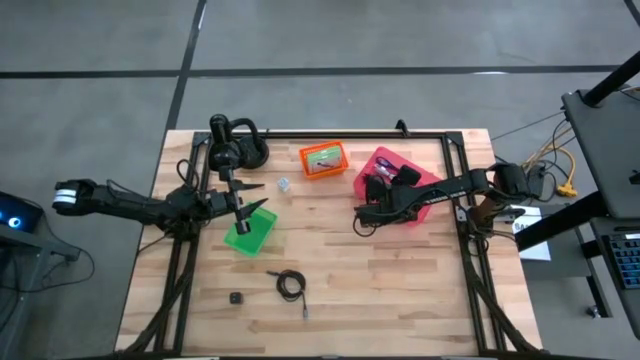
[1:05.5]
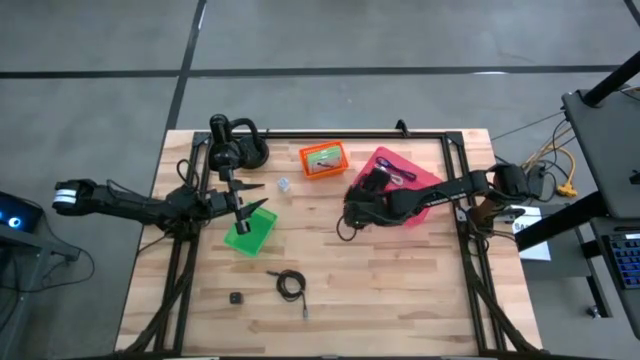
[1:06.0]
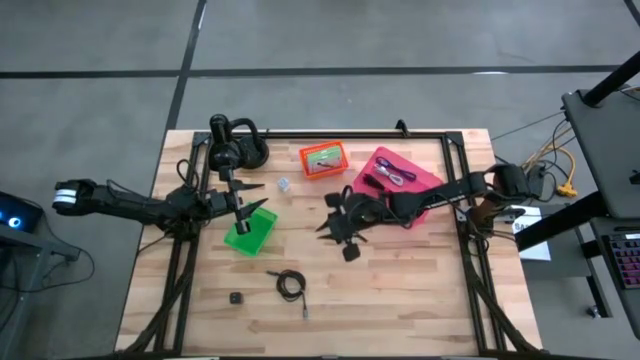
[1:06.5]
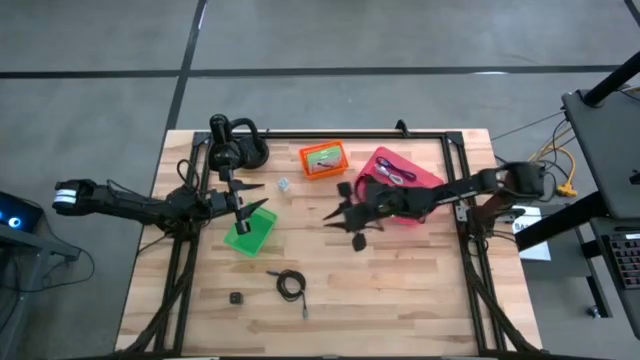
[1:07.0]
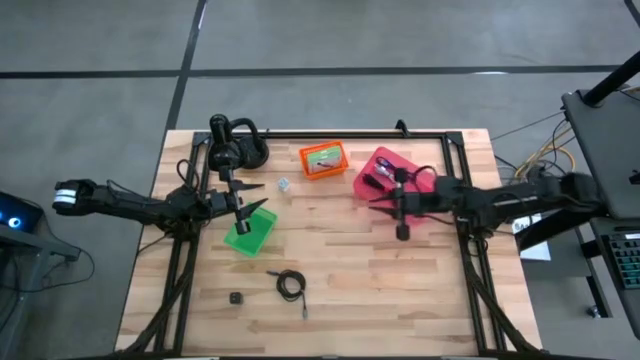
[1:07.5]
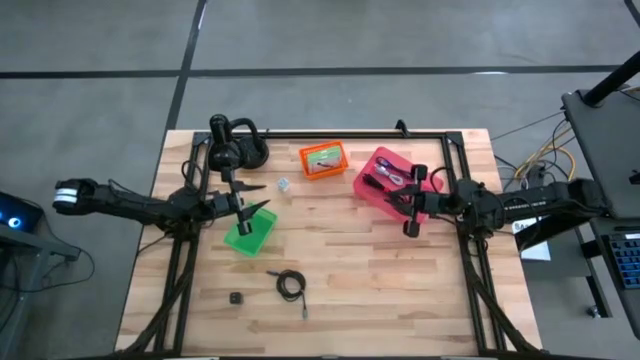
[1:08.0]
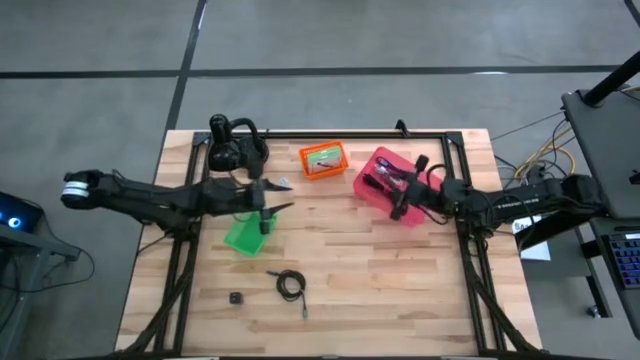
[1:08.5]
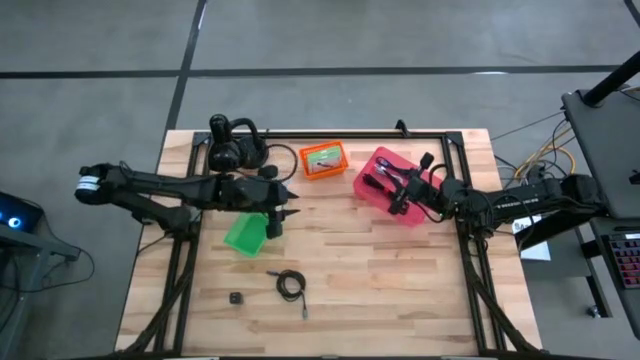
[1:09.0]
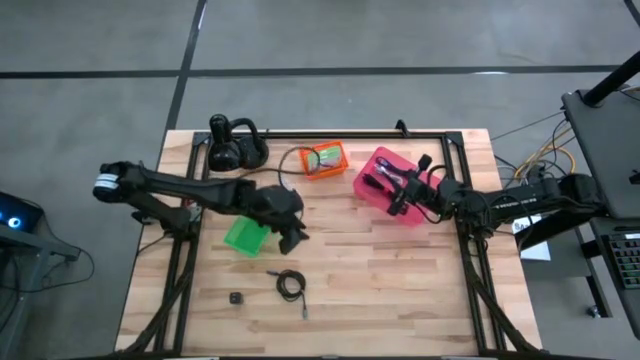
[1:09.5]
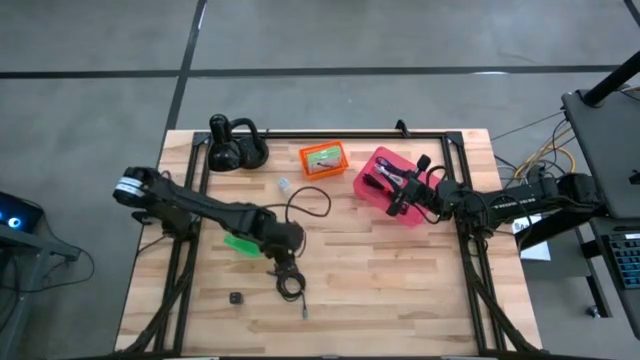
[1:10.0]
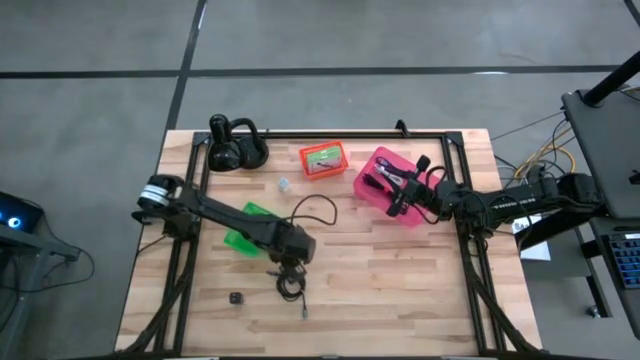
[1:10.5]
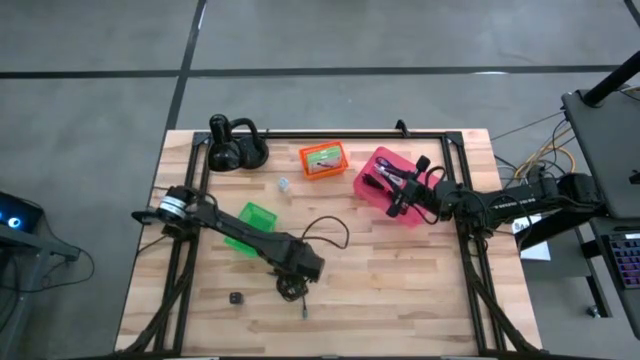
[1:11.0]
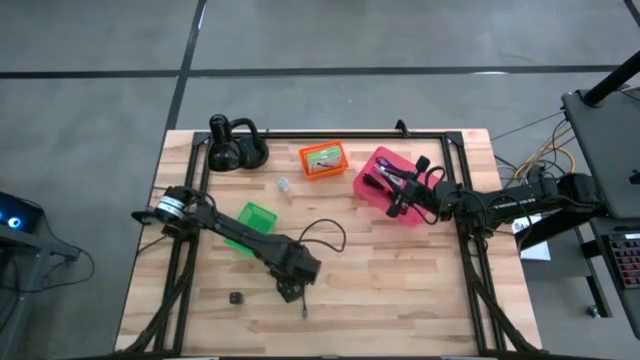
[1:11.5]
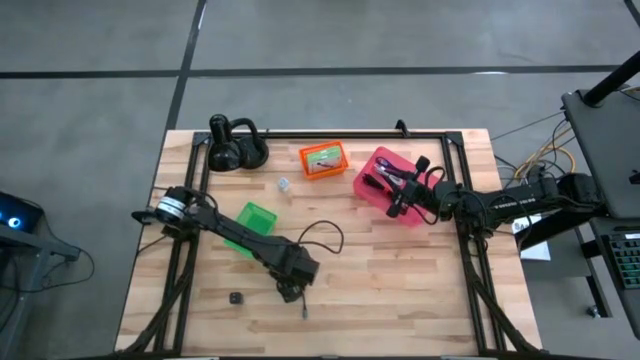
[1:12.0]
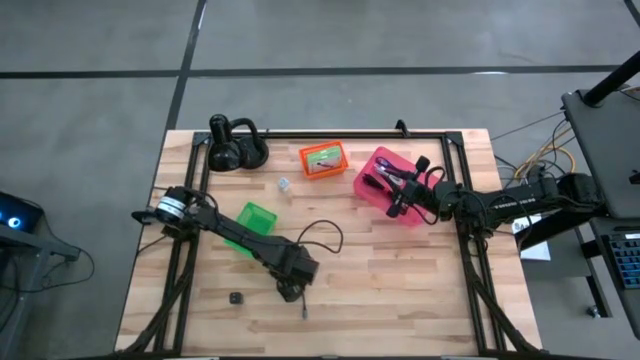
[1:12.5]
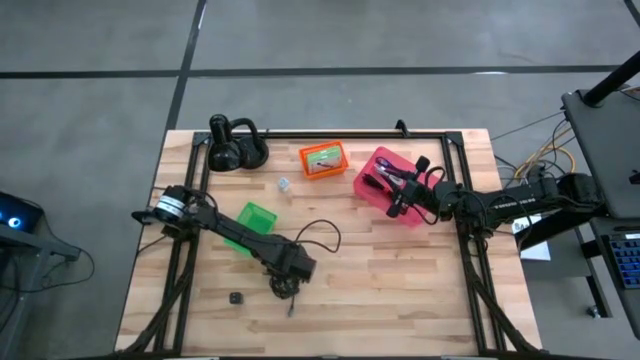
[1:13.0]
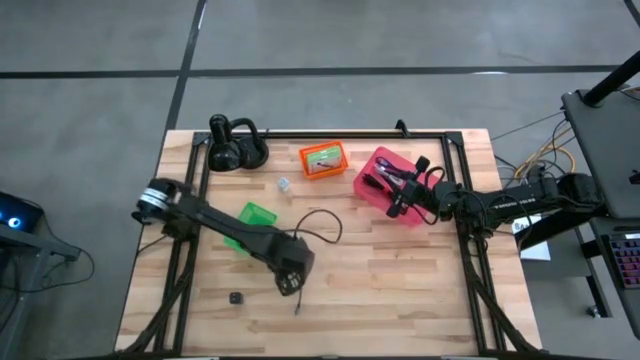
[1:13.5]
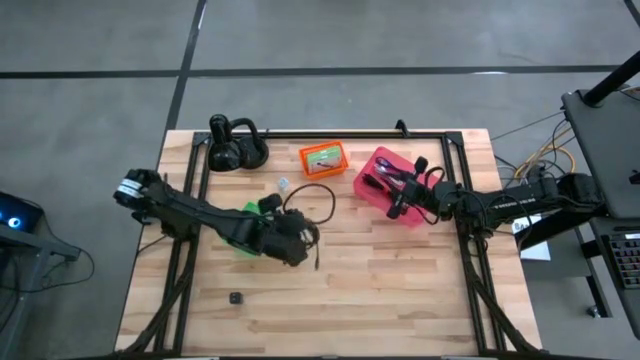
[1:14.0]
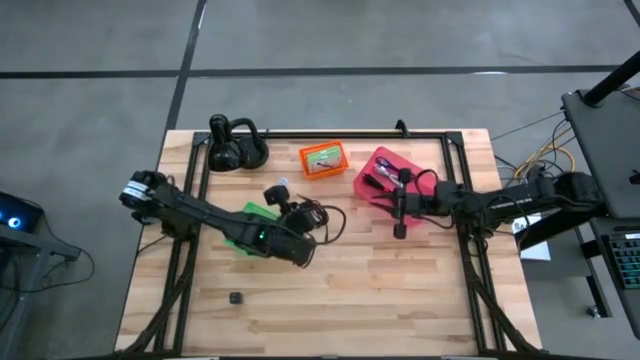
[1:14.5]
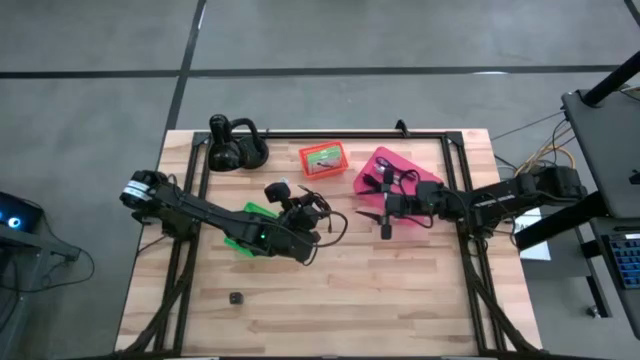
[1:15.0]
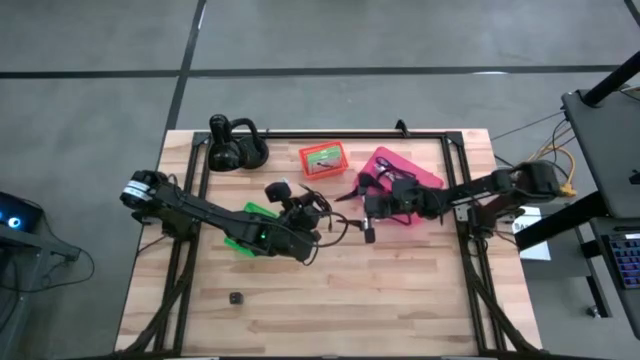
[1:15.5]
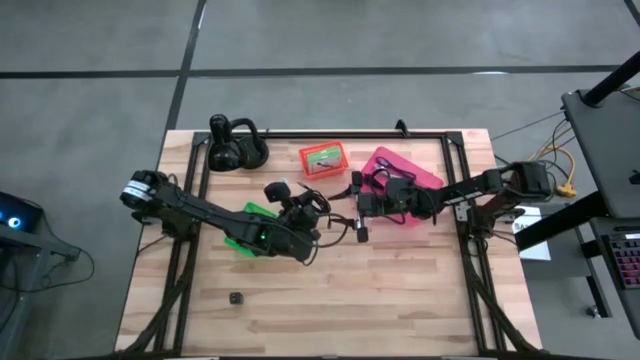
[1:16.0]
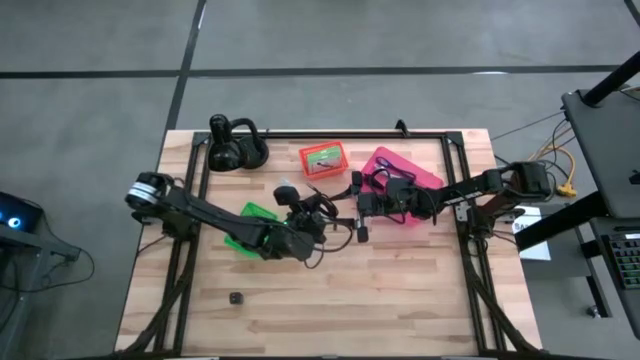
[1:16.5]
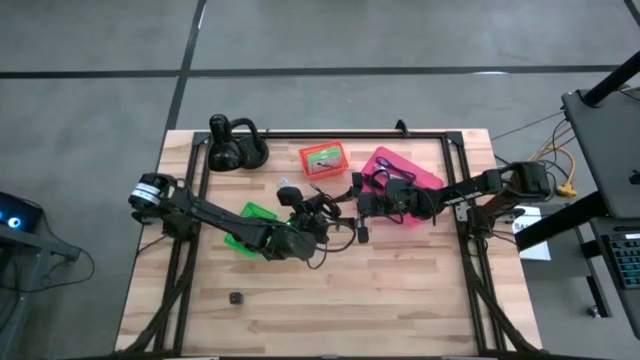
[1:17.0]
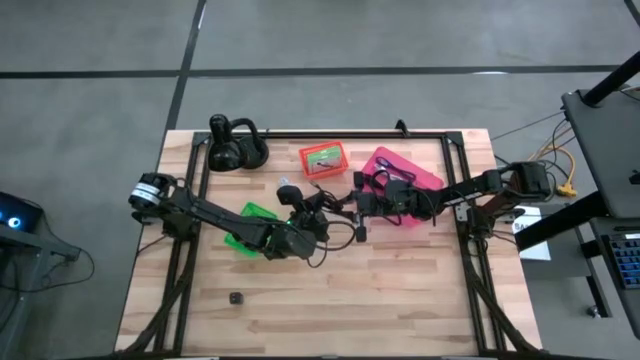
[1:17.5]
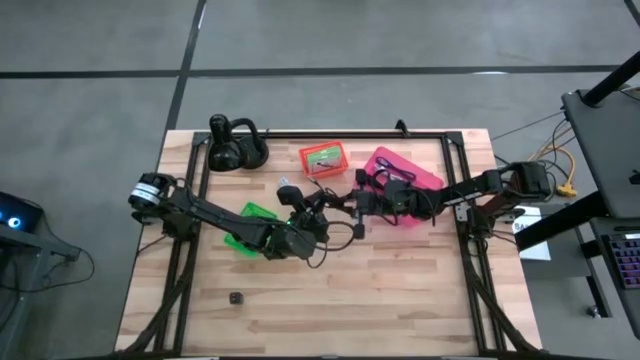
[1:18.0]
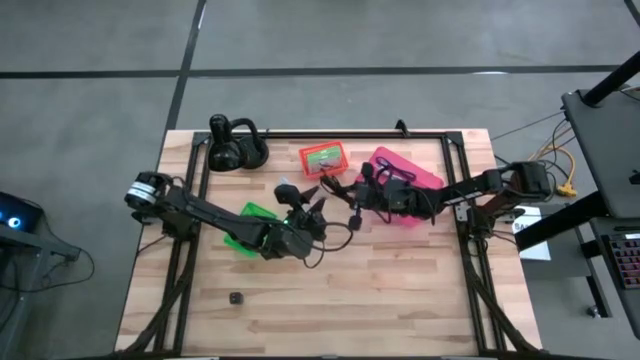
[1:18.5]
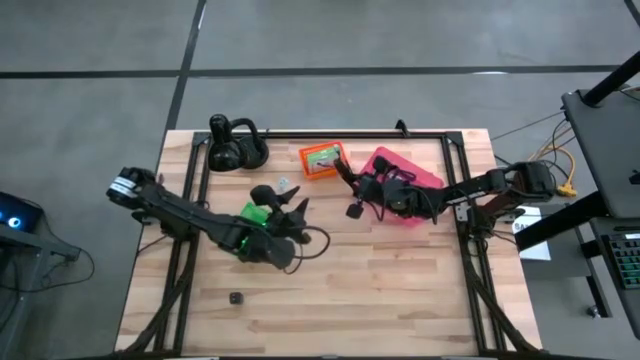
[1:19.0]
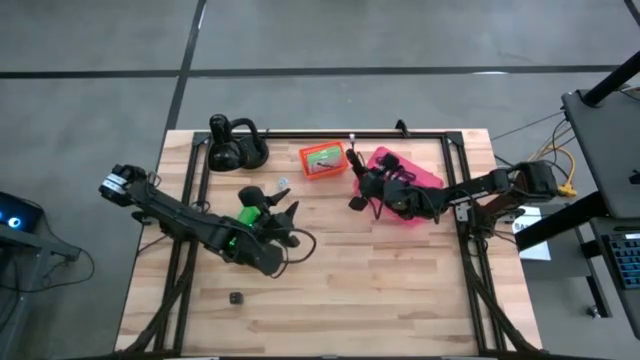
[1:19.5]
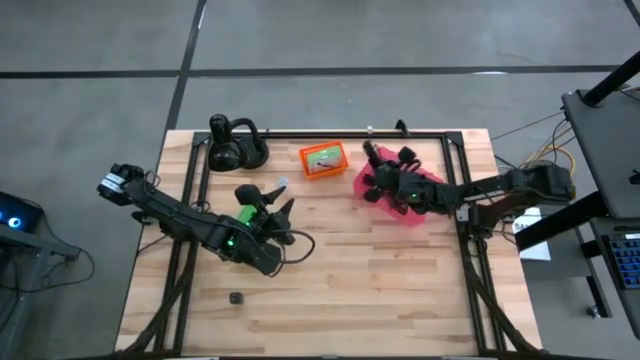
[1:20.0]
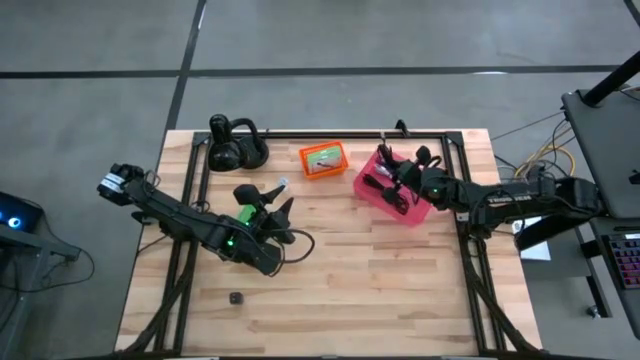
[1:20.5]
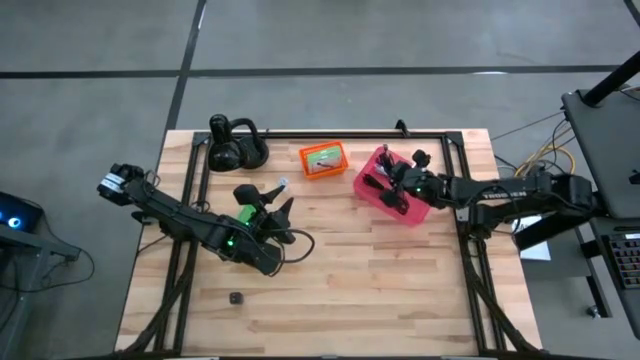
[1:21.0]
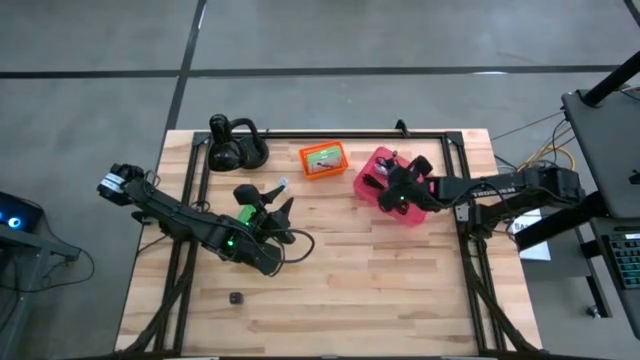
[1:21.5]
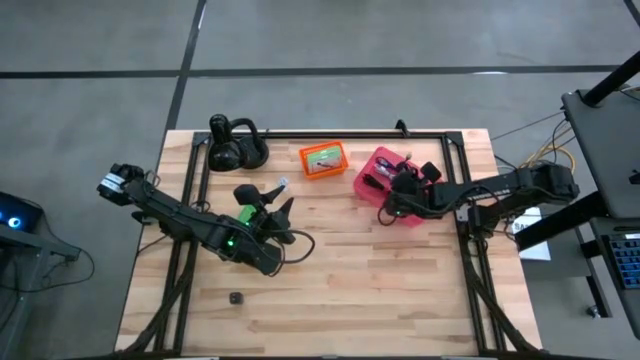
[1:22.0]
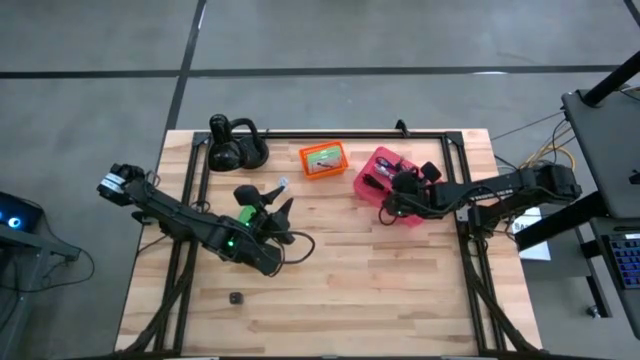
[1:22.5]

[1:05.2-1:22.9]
Task: Pick and place items into bin
Put the black charger cable into the pink bin

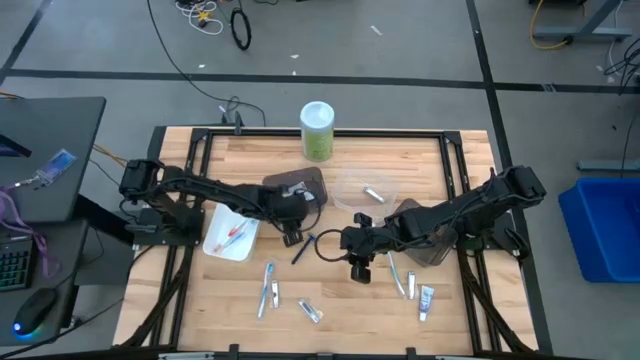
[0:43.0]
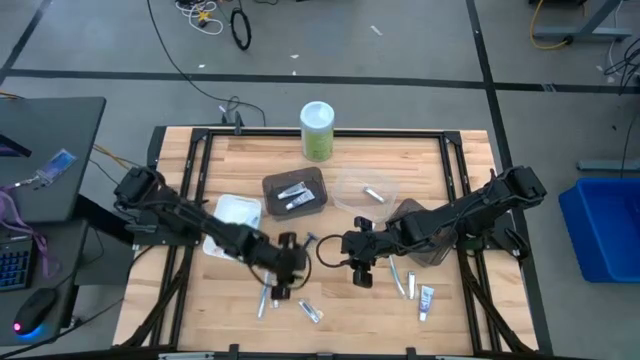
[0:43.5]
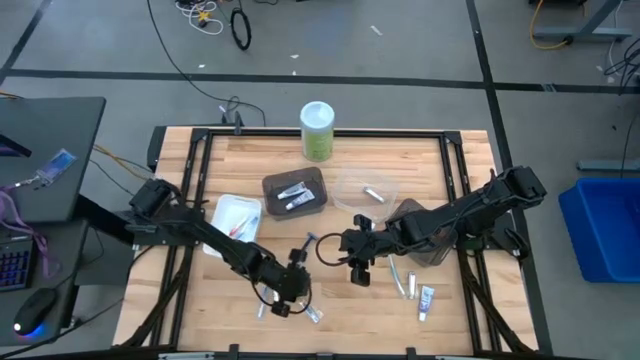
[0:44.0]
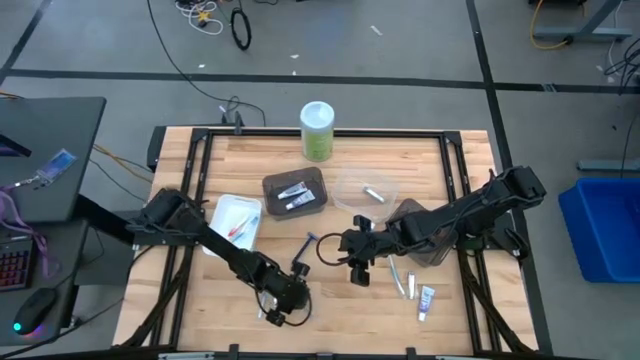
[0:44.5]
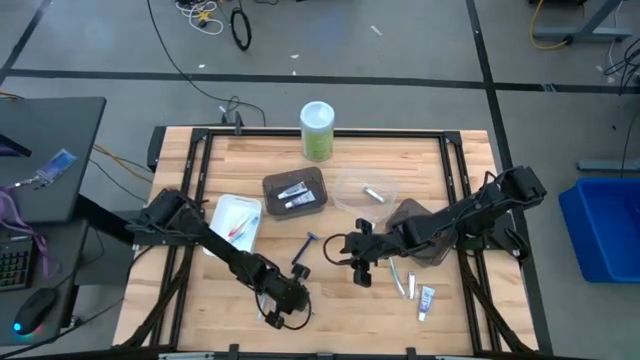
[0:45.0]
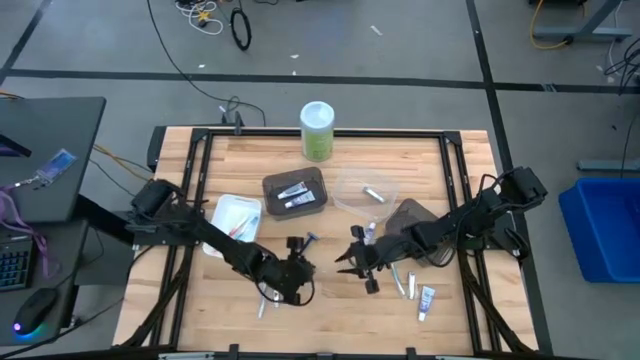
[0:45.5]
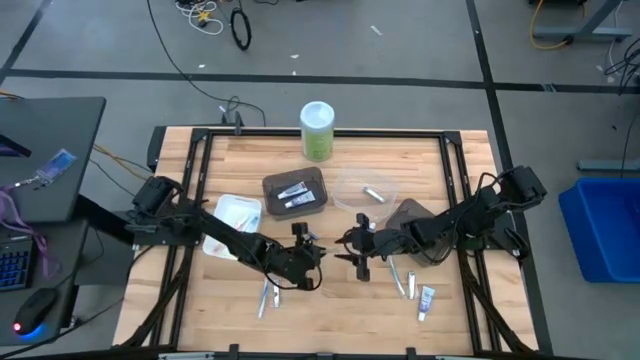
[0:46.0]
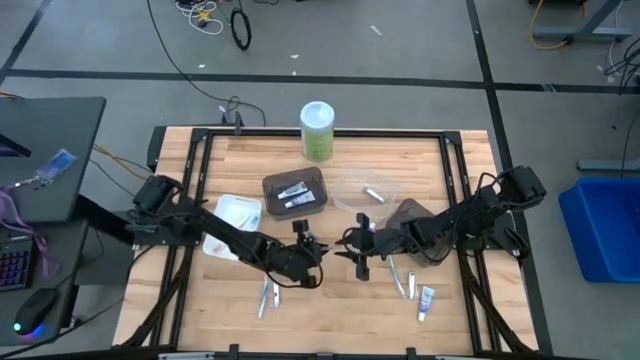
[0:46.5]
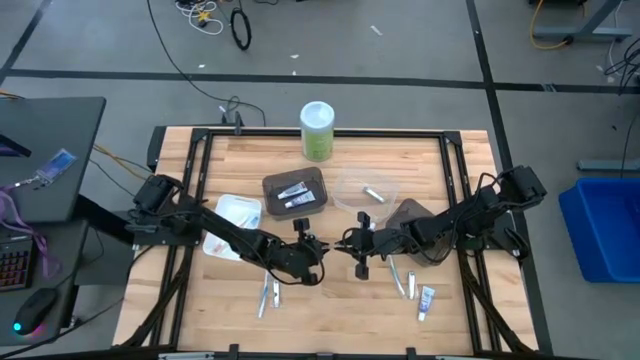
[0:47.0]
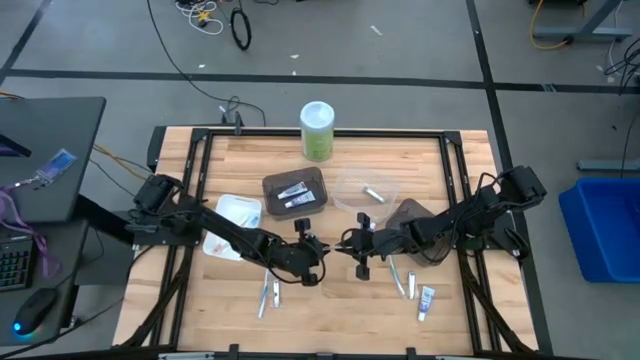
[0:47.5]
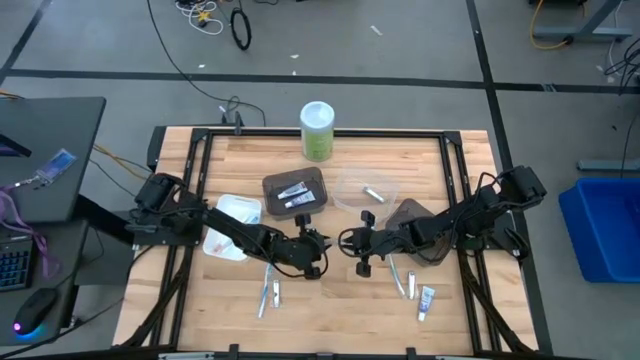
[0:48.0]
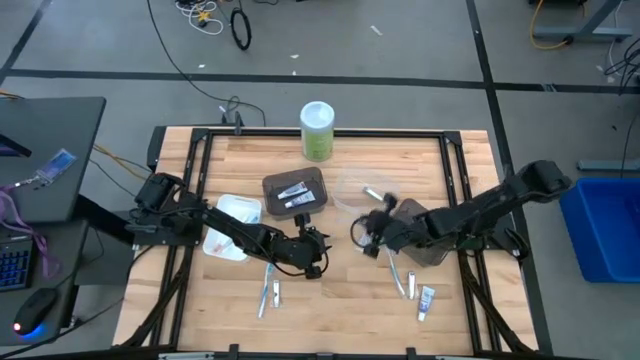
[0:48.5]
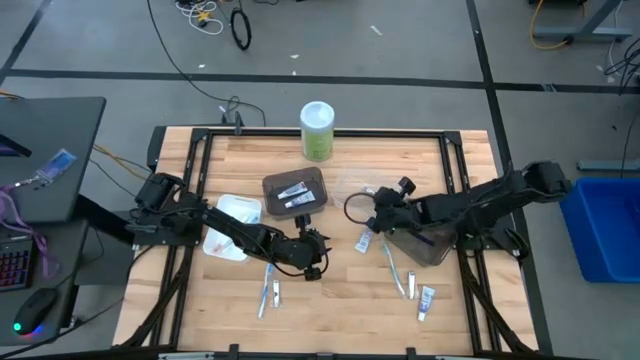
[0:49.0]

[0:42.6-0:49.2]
Task: Pick & Place Travel size toiletries
Put the nail cutter into the transparent bin
